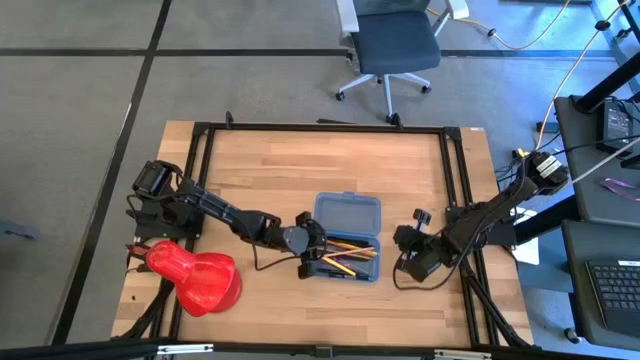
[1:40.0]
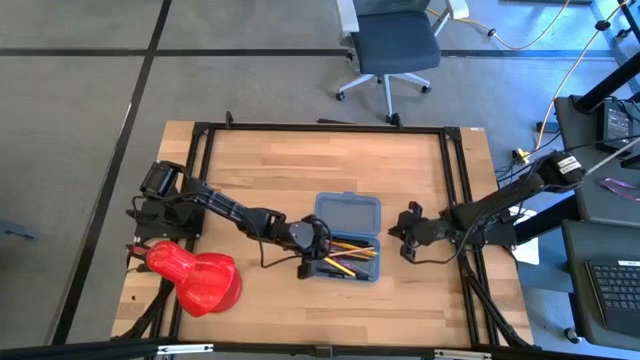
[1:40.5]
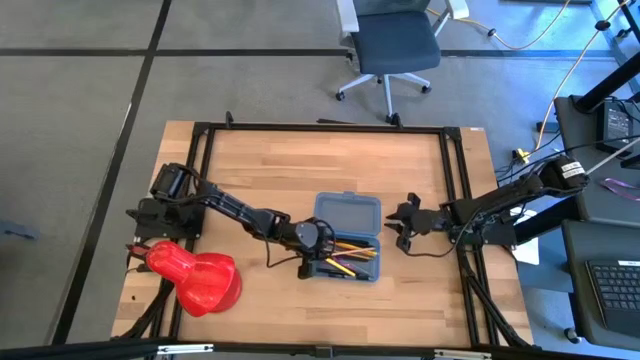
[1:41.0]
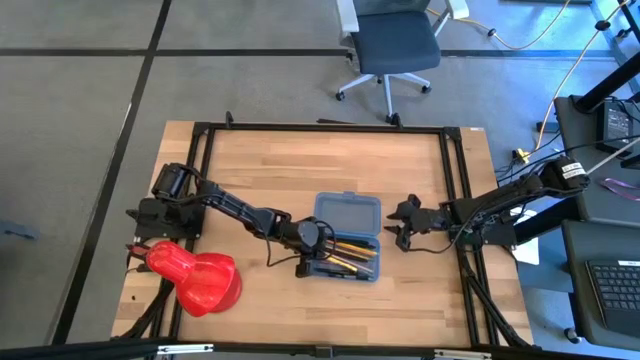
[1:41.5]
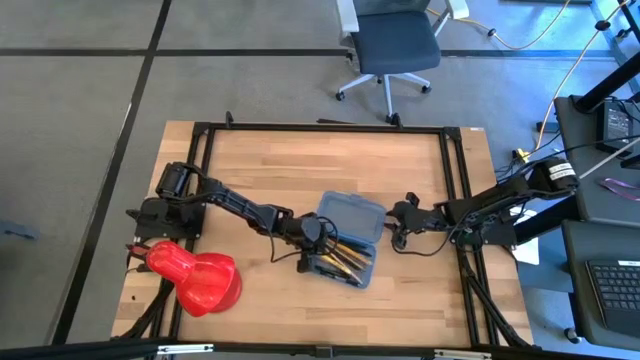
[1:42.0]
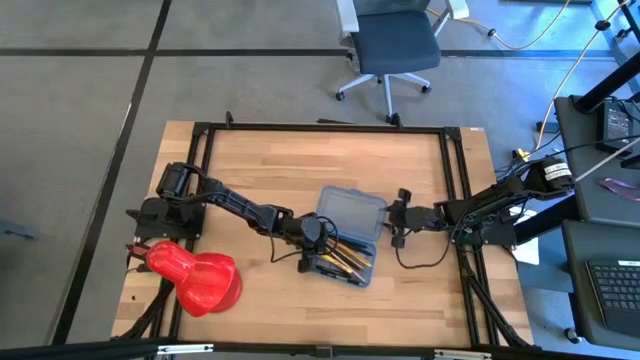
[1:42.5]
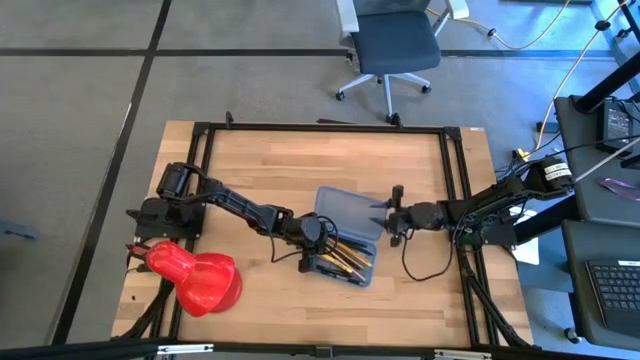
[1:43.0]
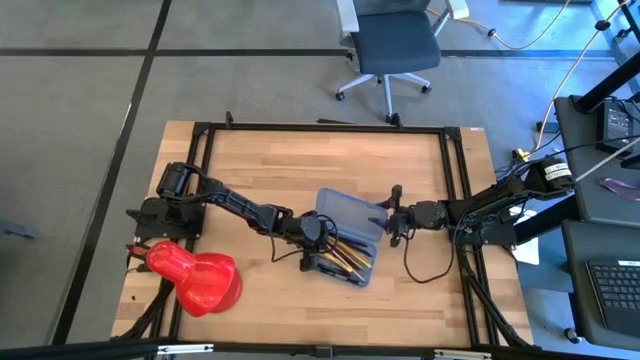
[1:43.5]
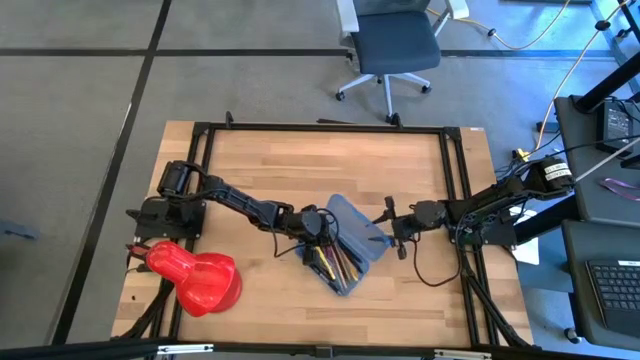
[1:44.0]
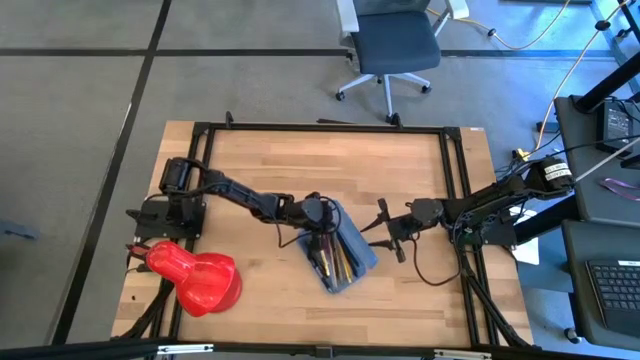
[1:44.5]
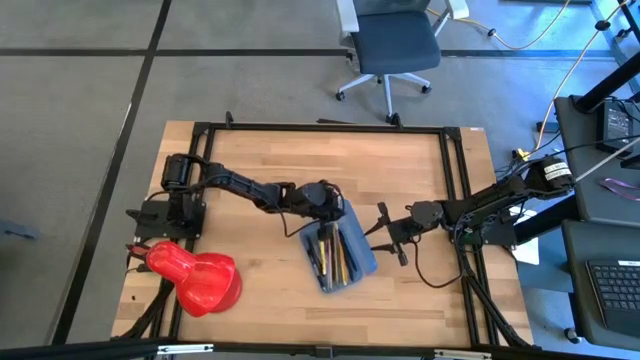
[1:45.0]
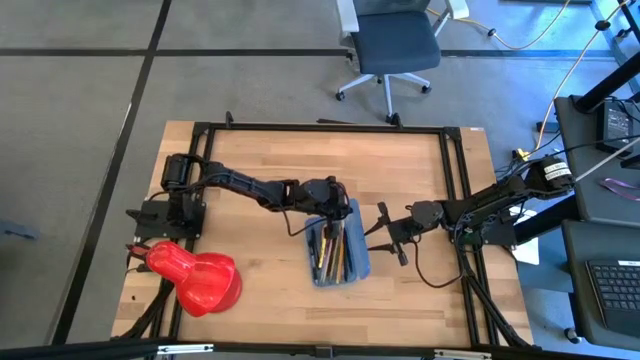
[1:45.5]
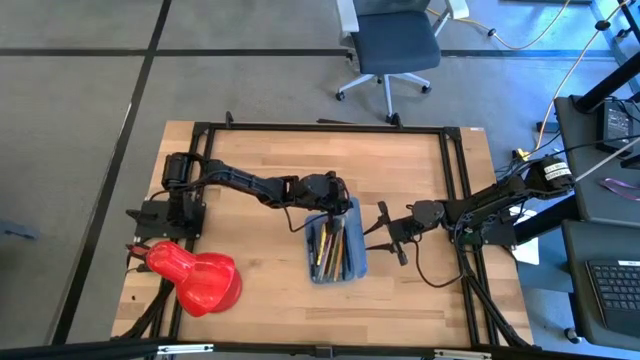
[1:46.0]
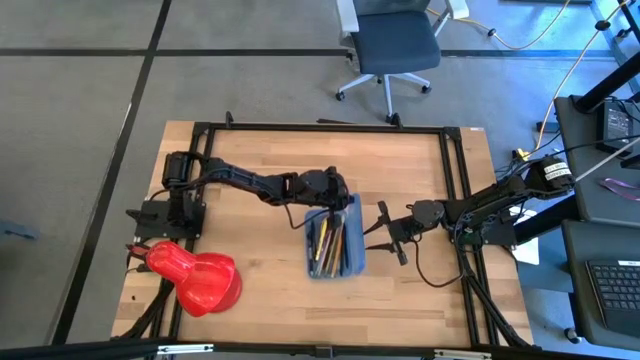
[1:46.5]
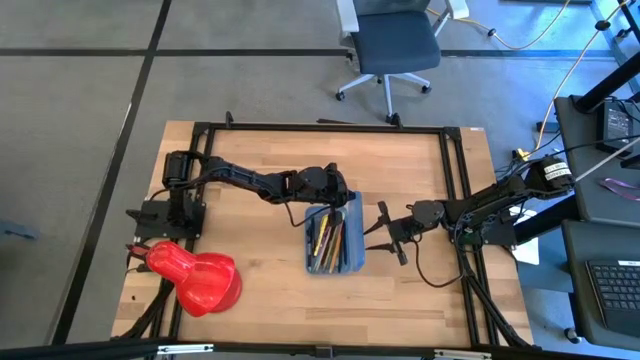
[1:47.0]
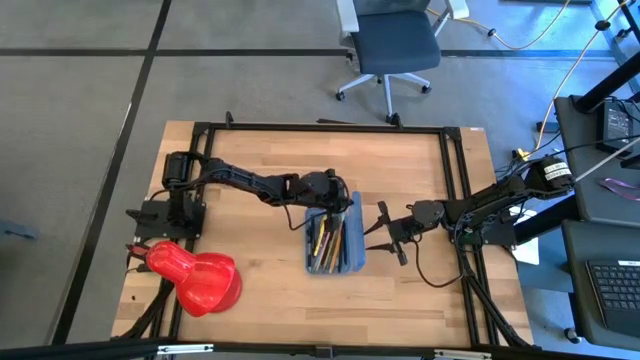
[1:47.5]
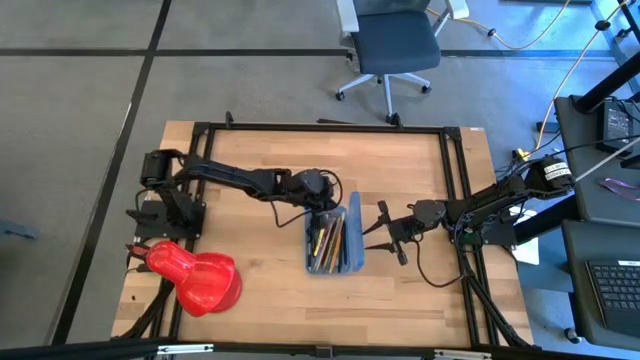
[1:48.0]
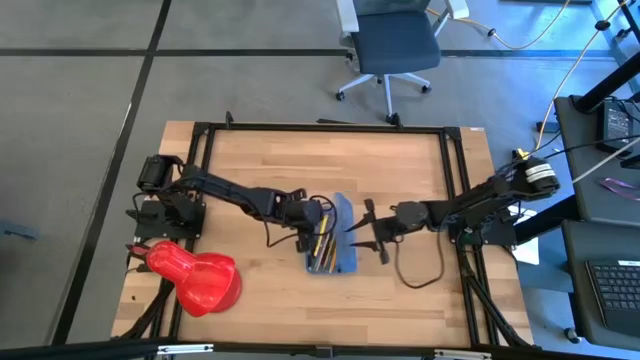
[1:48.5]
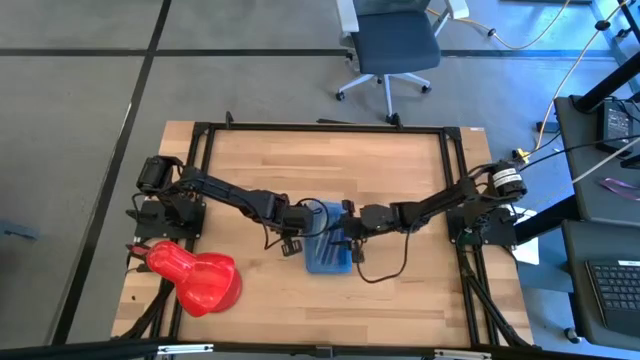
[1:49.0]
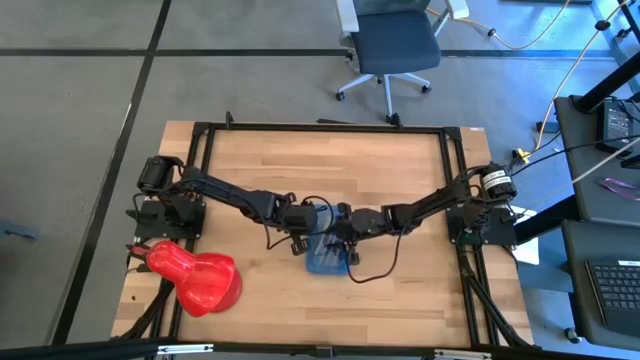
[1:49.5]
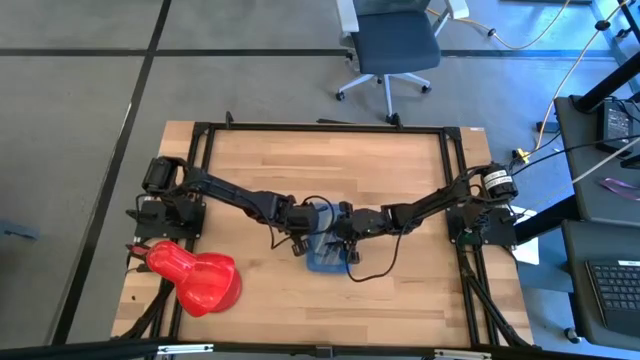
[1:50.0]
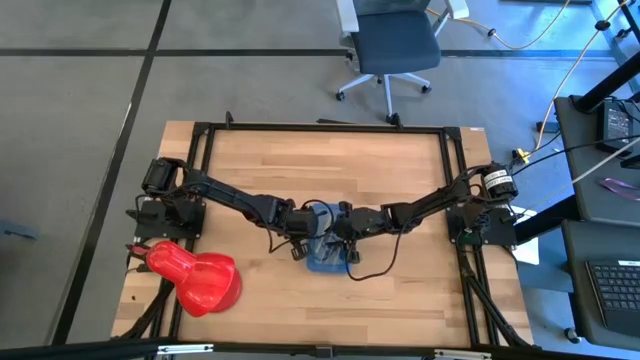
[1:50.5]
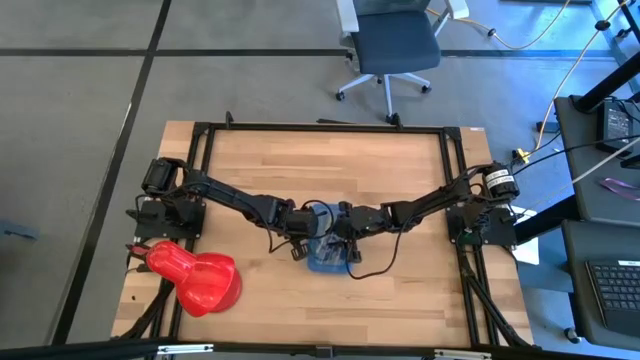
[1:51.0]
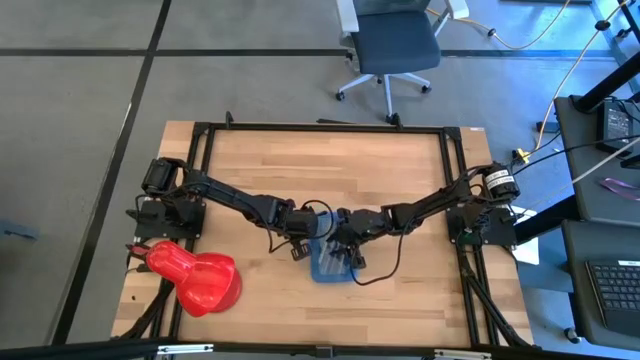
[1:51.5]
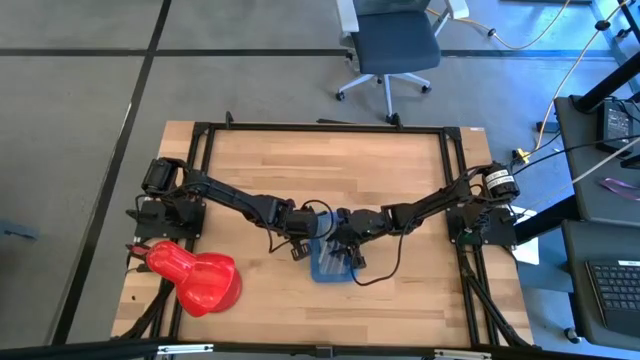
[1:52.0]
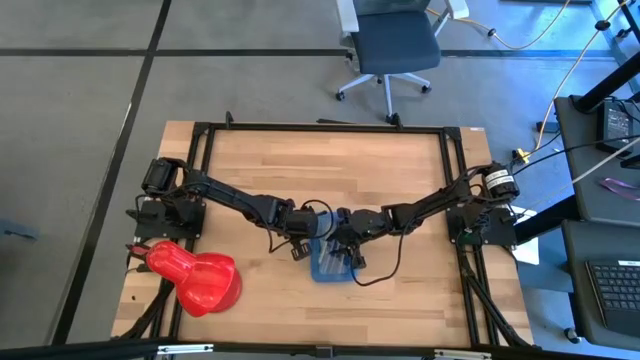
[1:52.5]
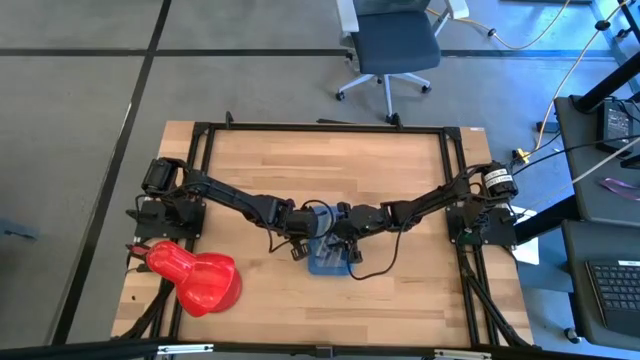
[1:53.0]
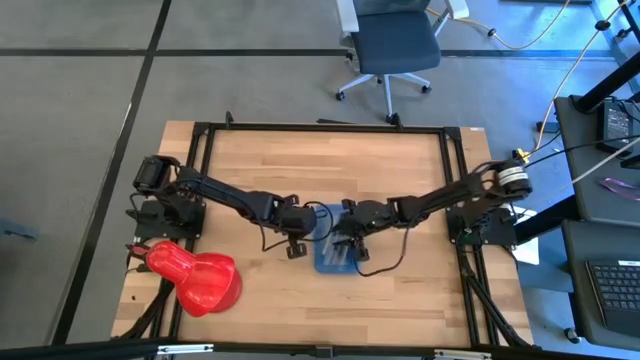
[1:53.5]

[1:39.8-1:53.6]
Task: Pick & place school supplies into a supply box
Close the blue supply box

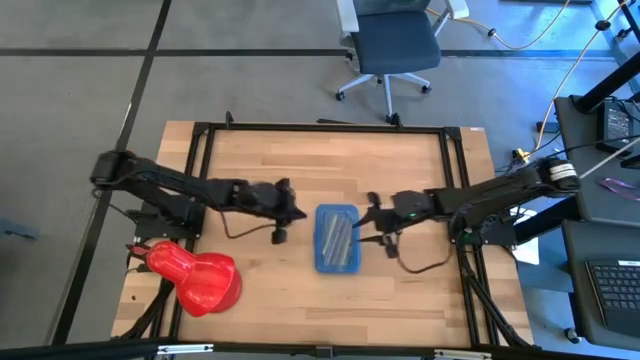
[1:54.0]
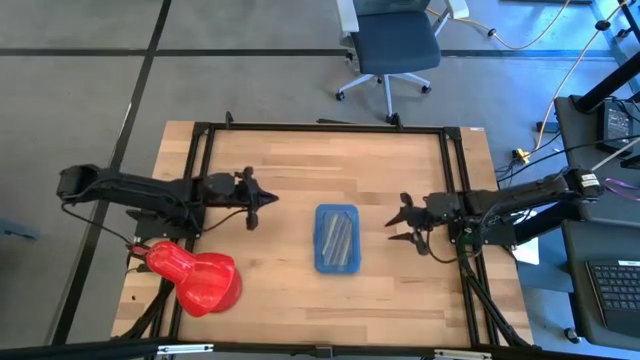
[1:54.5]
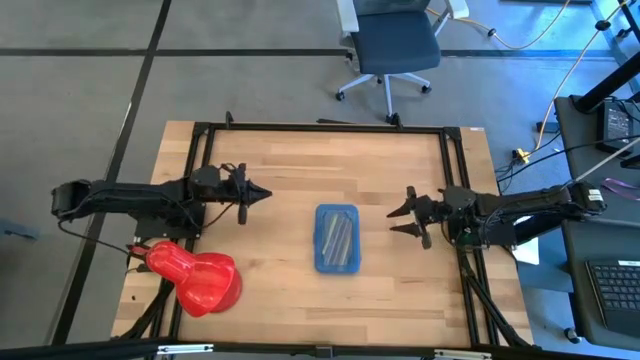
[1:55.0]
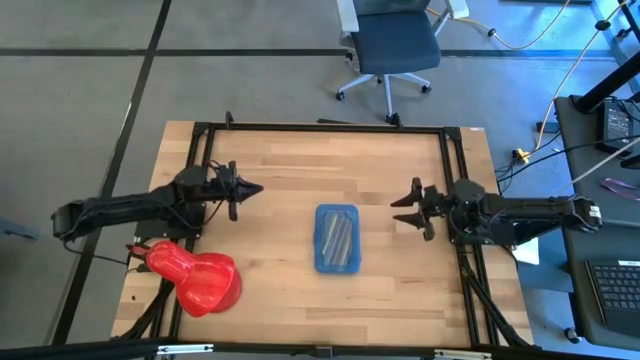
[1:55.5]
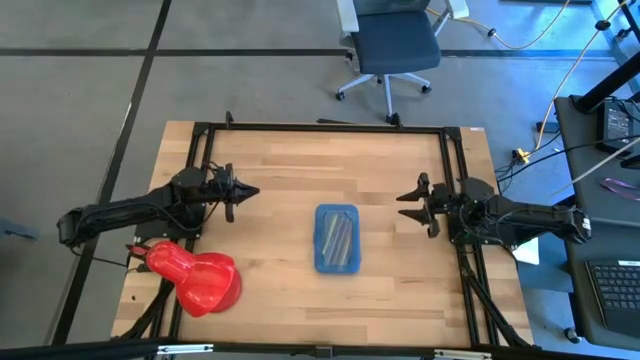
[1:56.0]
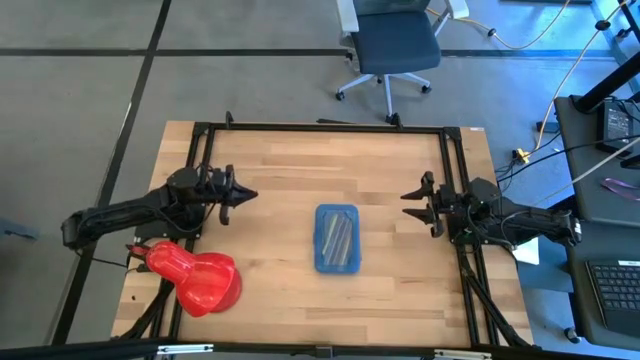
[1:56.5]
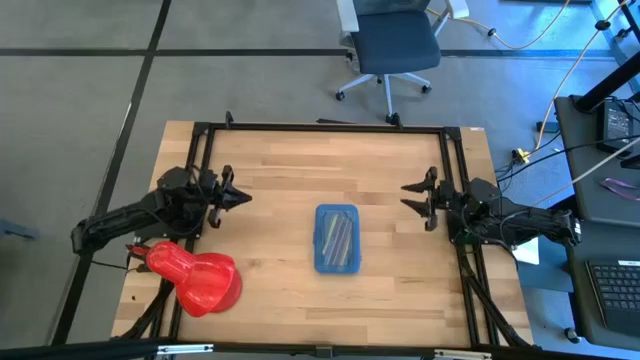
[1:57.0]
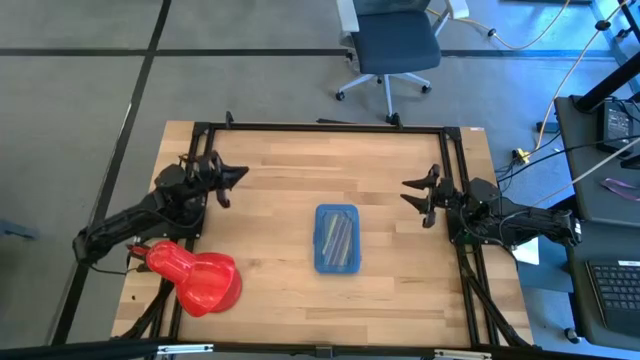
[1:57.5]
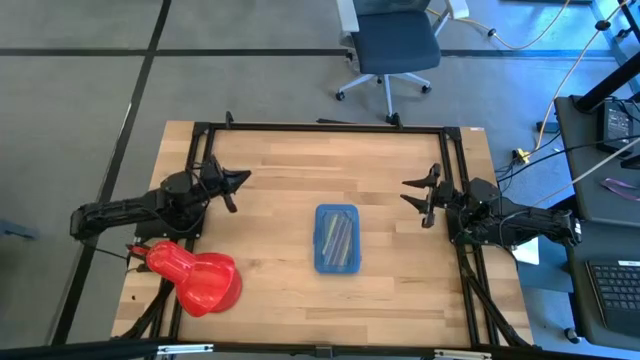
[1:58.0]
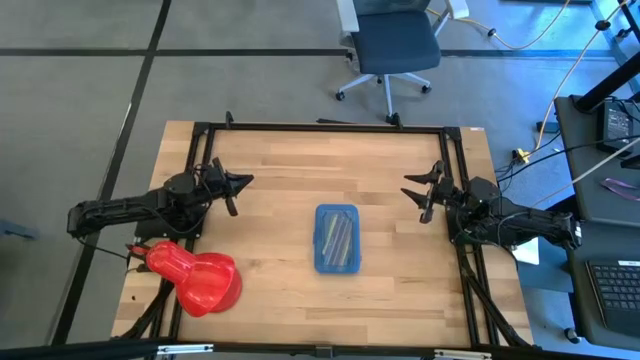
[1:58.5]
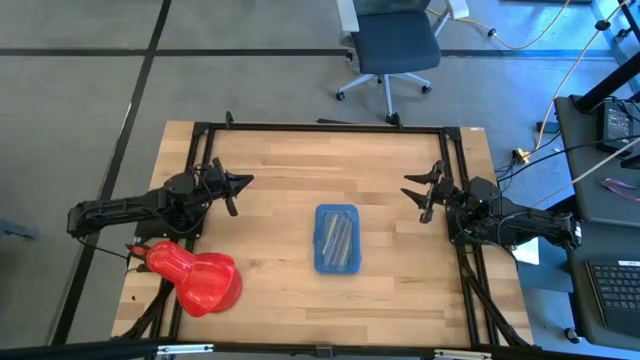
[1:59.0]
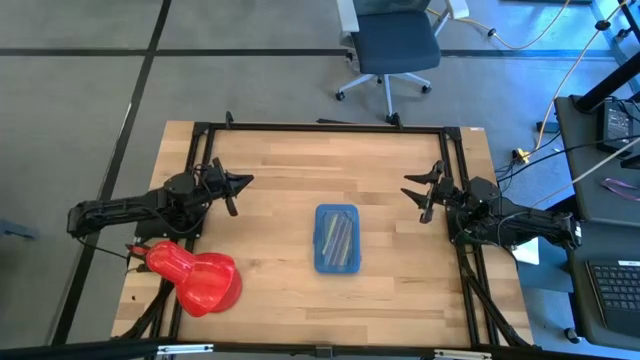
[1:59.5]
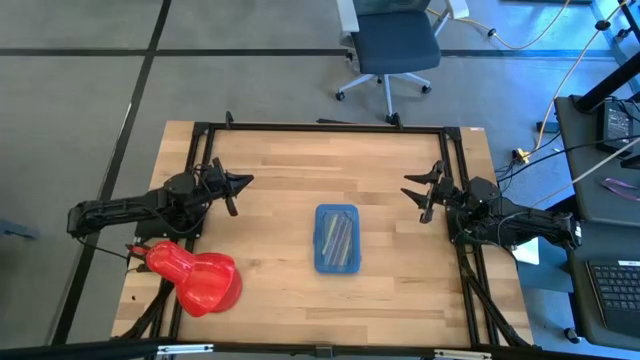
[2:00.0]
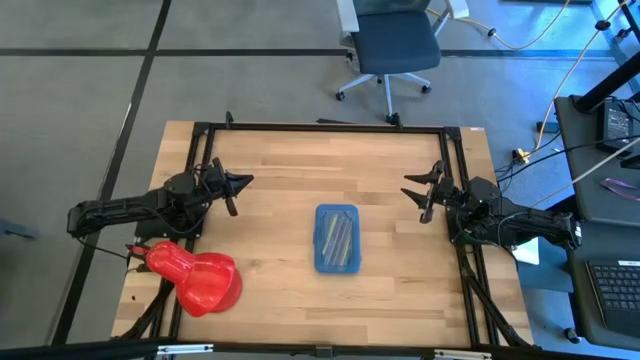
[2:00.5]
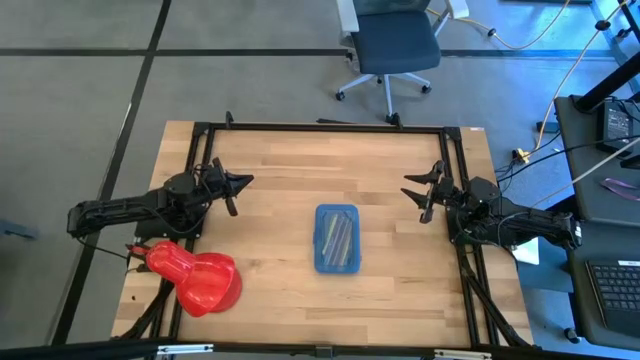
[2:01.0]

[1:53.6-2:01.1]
Return to Home Position

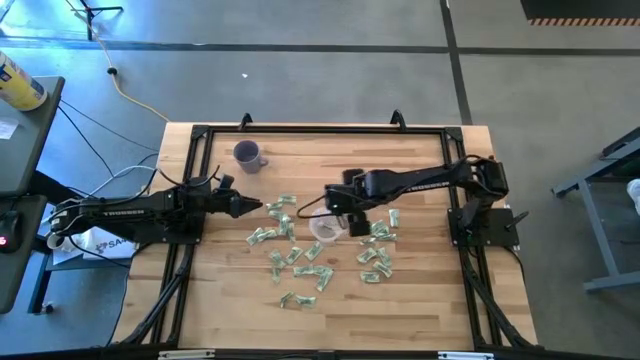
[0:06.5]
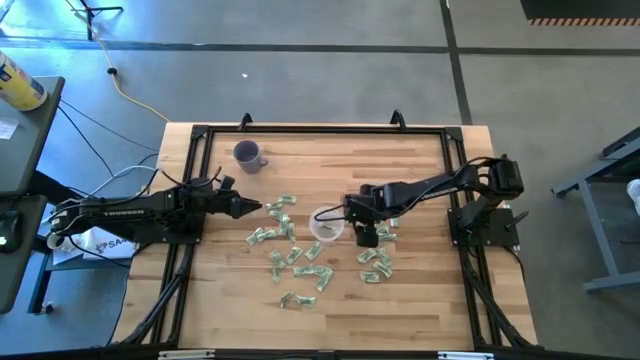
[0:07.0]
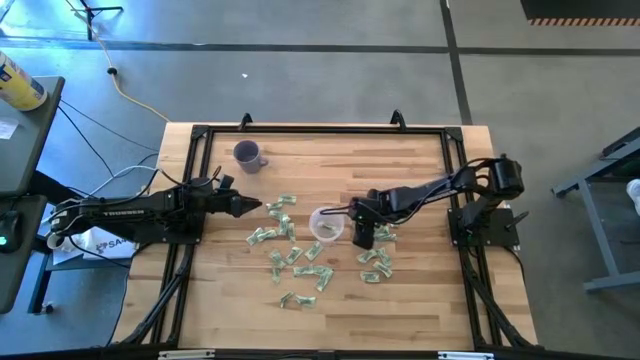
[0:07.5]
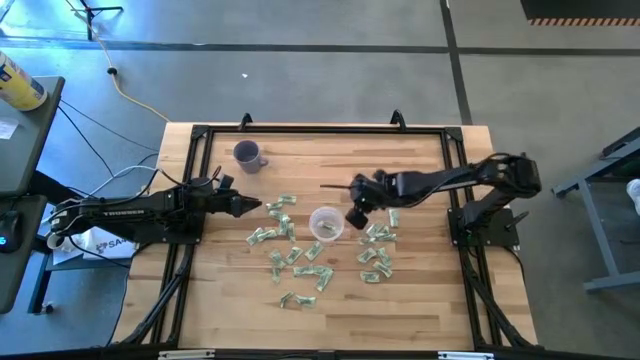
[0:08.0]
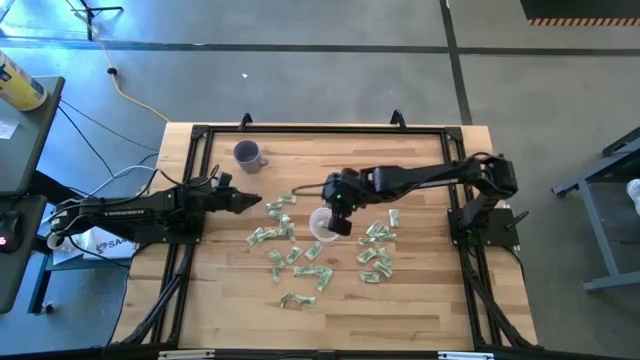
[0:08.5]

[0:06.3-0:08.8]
Task: Pick and place Stevia / Truvia into bins
Put the stevia packet into the transparent container
